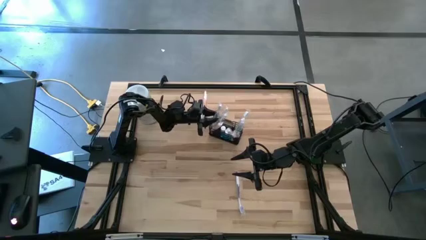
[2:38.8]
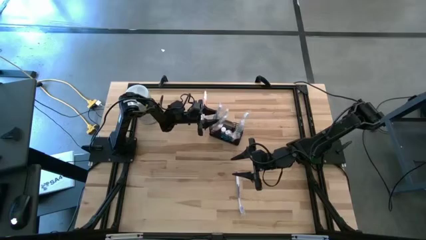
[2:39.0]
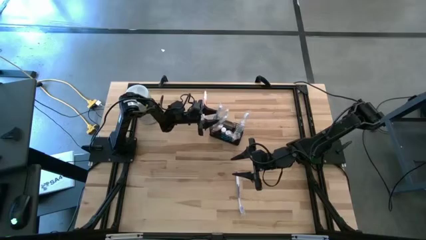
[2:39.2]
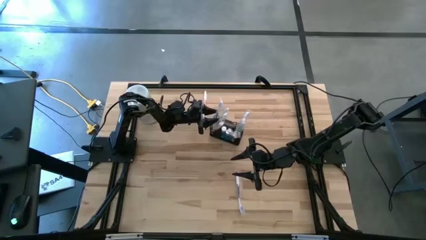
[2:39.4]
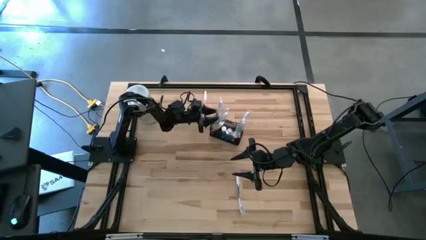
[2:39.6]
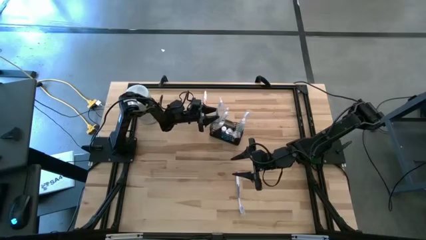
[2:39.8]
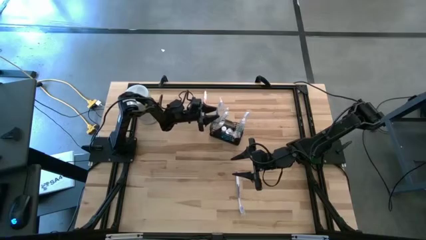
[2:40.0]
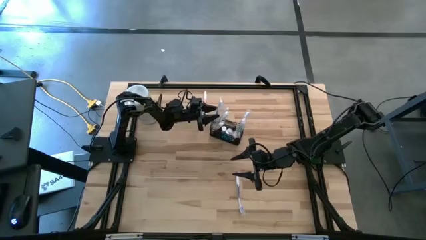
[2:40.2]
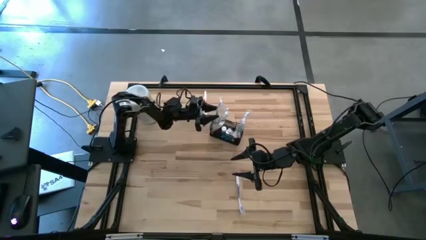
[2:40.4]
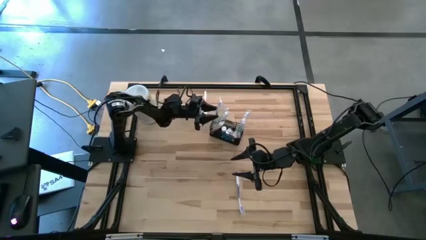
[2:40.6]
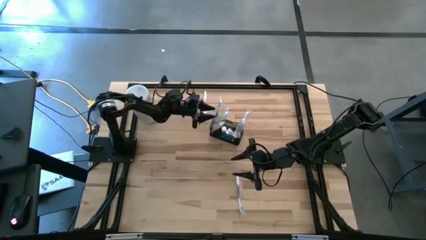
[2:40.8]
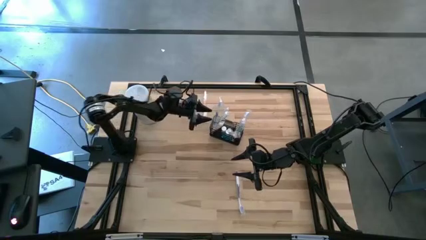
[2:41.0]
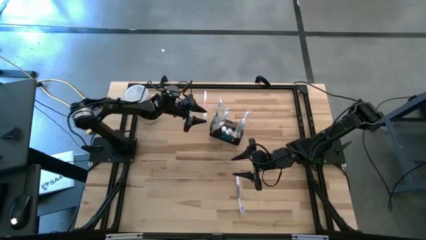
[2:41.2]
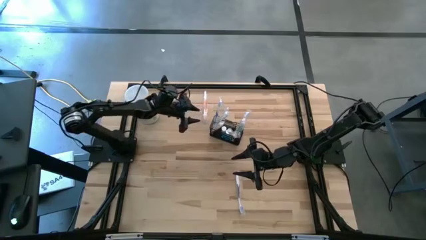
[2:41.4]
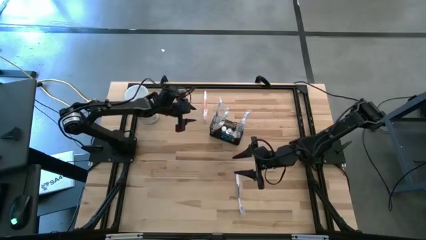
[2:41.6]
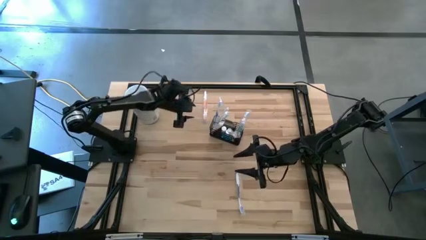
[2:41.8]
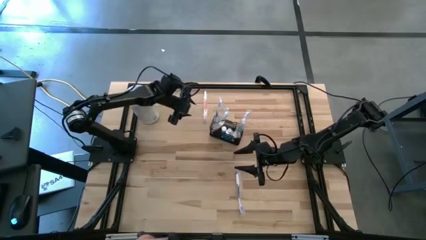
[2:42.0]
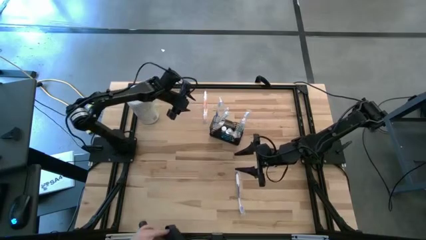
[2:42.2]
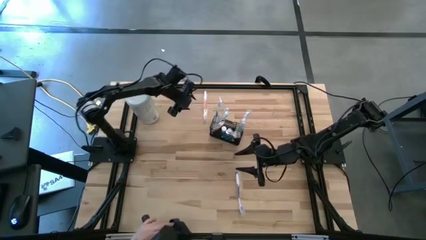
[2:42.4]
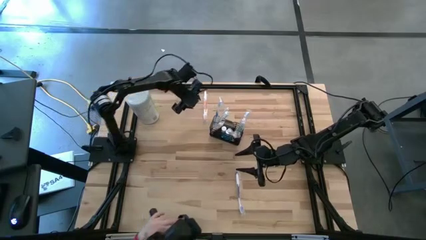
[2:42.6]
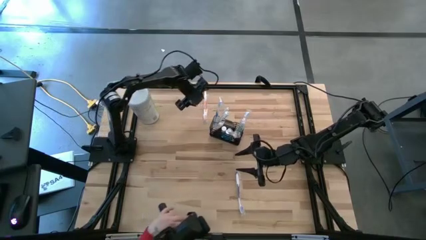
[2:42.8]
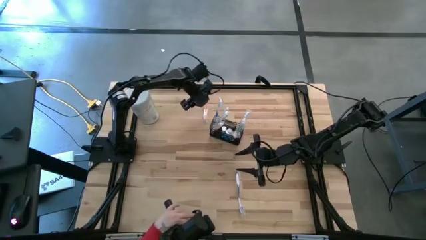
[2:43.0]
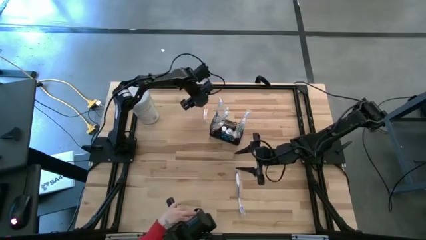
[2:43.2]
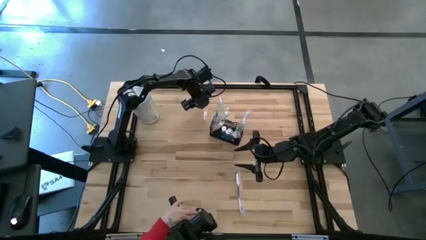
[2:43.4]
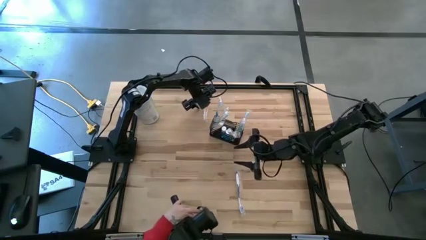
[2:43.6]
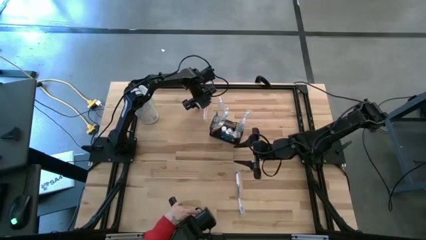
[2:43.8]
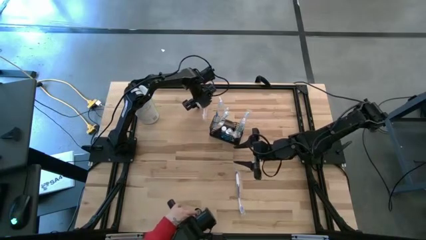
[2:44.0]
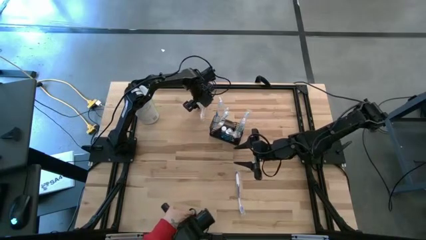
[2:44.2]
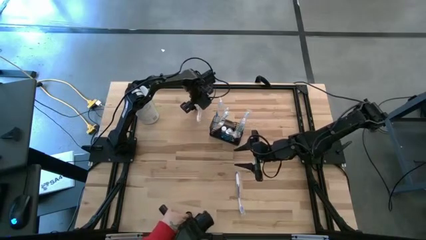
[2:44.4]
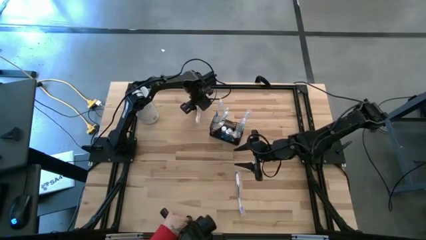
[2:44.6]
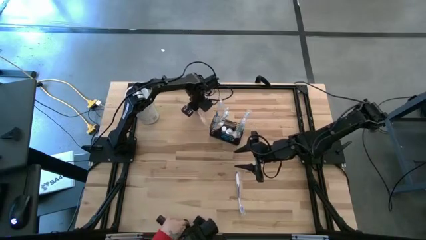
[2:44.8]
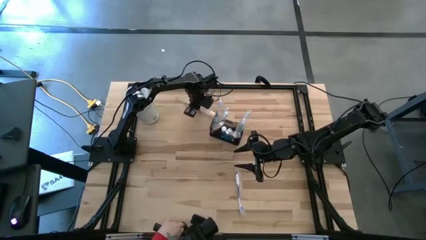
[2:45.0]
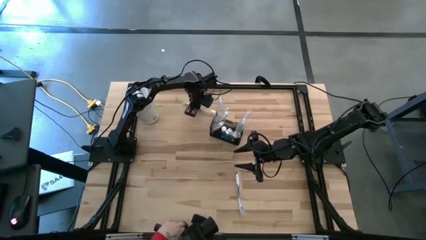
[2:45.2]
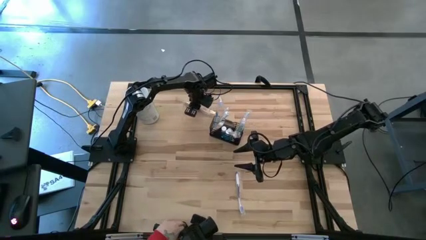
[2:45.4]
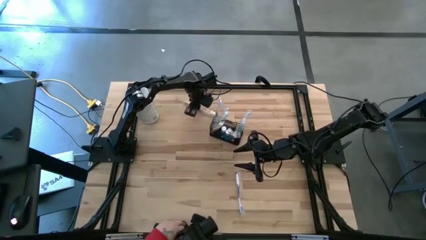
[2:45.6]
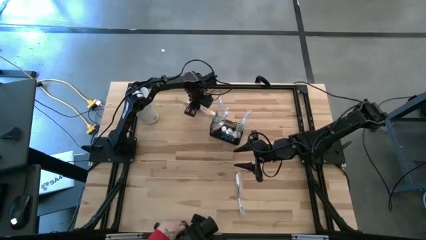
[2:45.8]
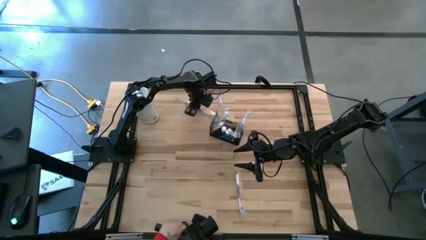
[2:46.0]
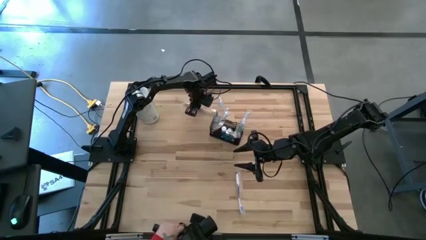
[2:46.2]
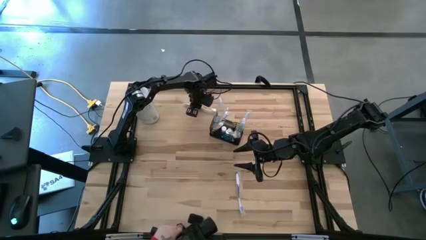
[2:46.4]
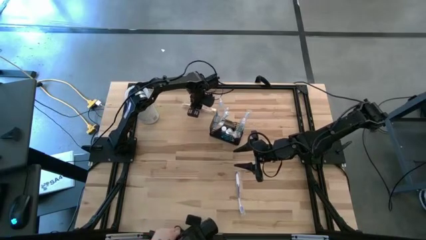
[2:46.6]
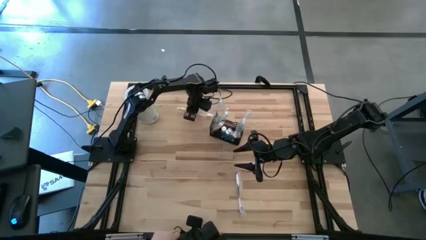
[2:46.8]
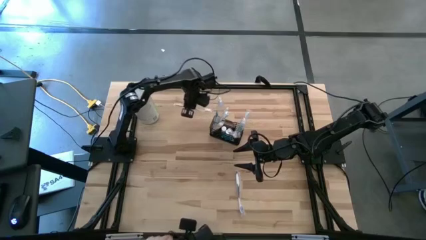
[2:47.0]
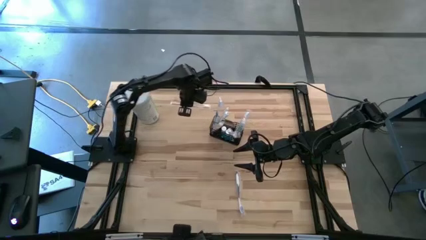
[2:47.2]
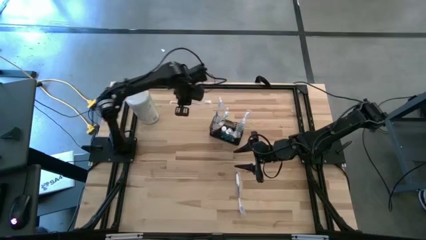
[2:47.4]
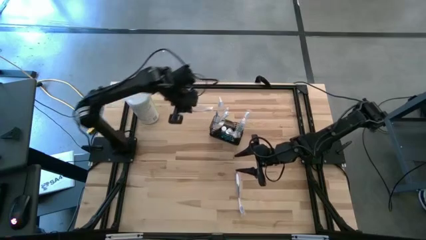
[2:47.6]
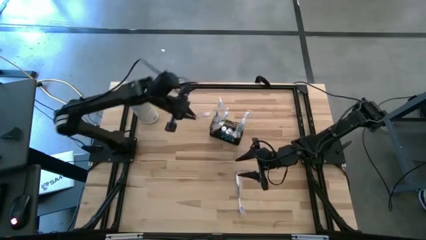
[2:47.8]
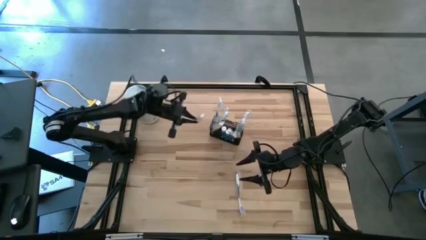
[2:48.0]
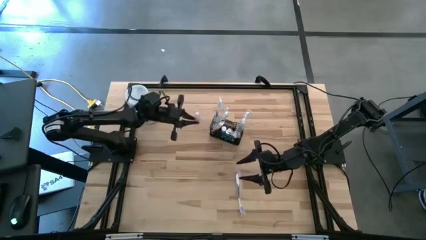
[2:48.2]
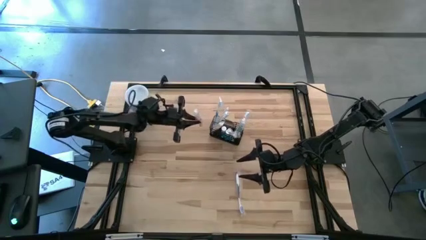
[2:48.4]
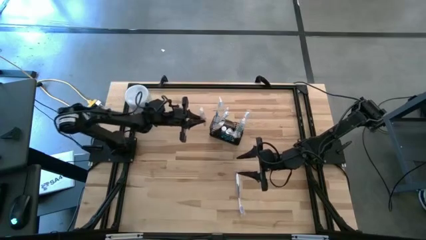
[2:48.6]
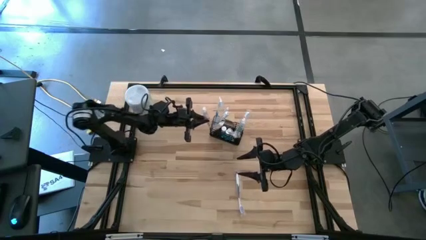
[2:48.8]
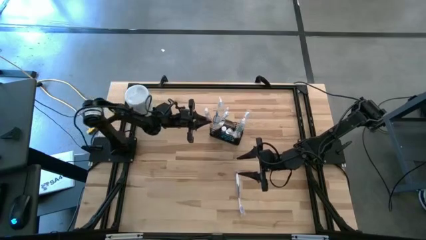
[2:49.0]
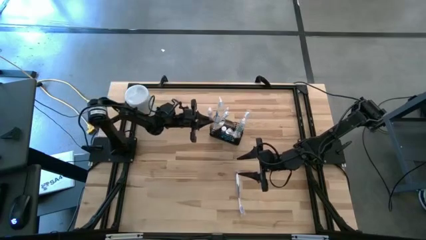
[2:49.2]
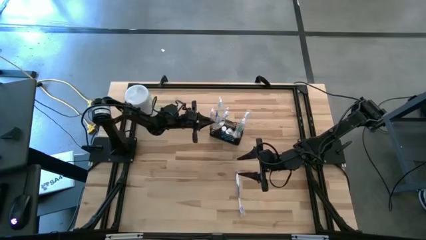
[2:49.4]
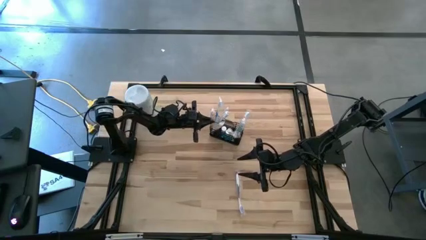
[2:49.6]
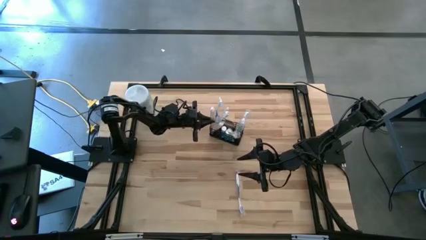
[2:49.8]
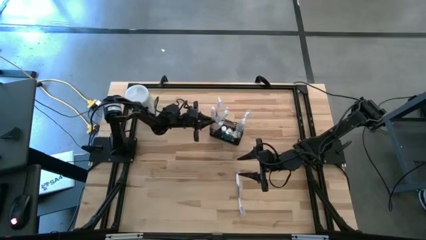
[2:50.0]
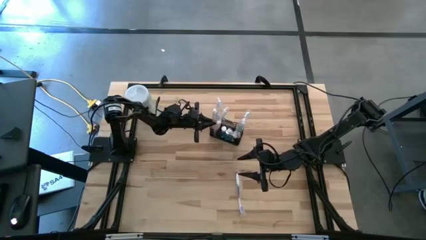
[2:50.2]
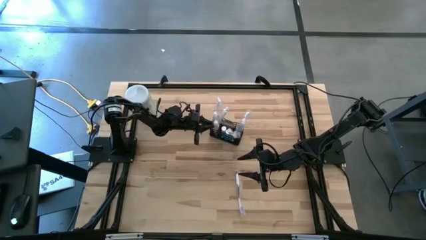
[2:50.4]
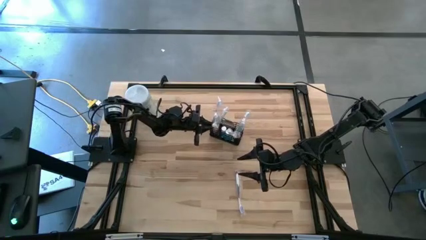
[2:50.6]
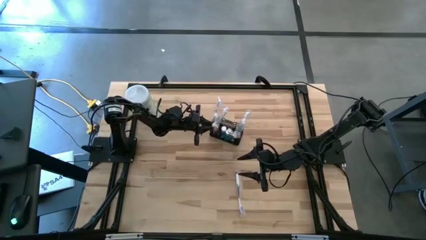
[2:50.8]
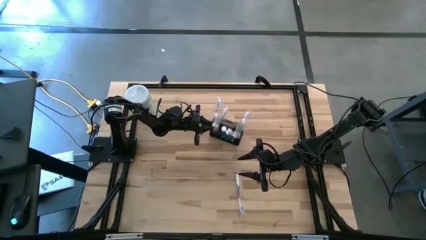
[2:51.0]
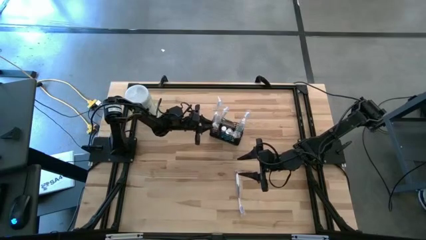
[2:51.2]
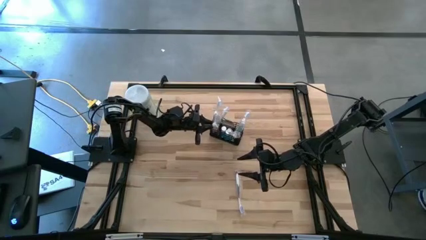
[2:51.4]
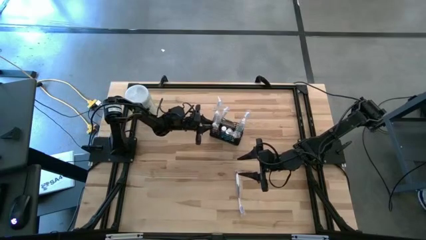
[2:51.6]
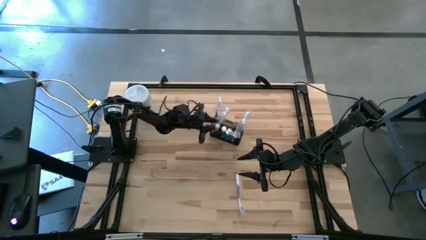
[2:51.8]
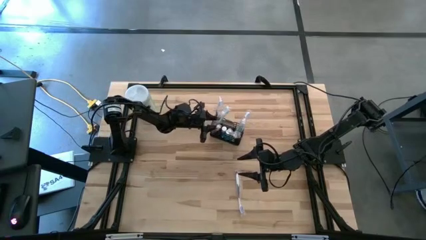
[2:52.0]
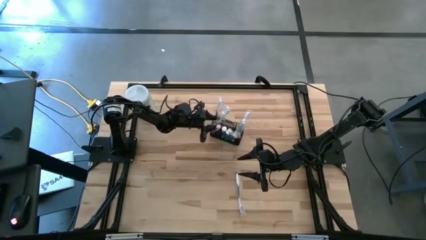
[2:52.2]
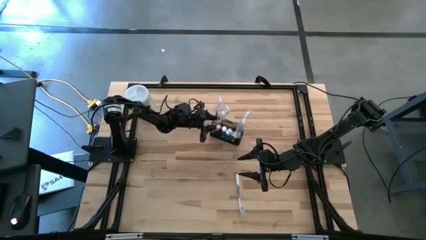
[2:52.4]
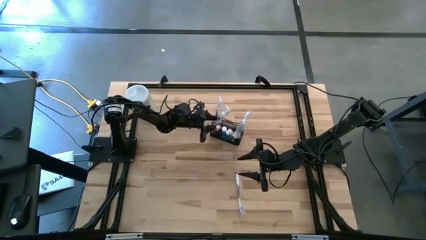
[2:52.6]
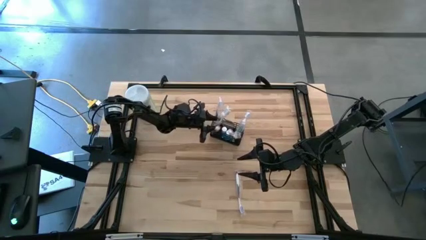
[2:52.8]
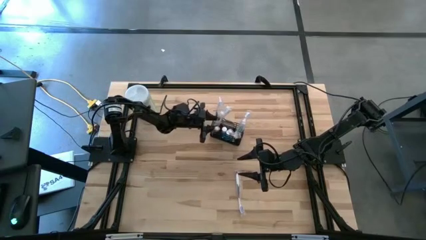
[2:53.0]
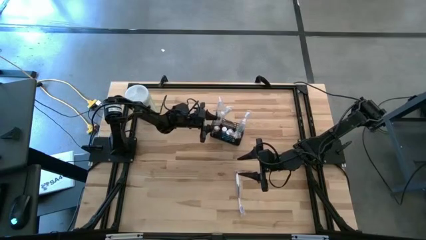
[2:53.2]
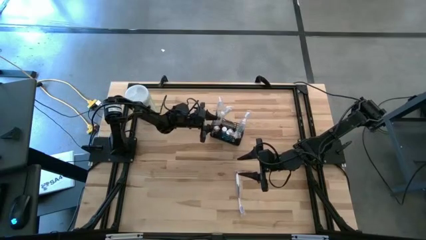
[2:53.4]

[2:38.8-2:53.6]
Task: Pick & Place toothbrushing station
Put the orange toothbrush into the mesh organizer

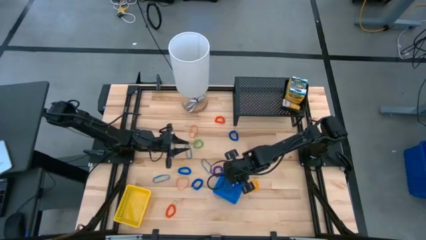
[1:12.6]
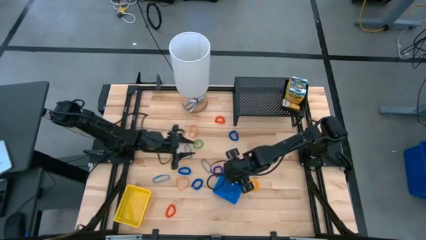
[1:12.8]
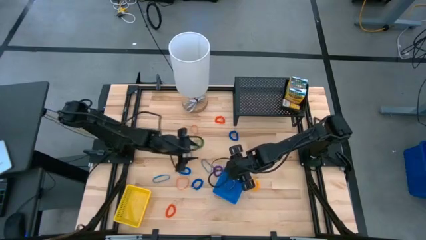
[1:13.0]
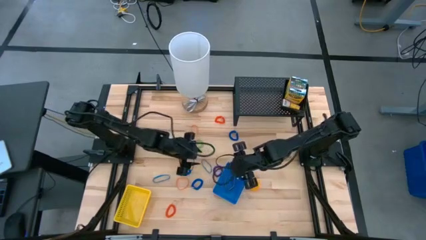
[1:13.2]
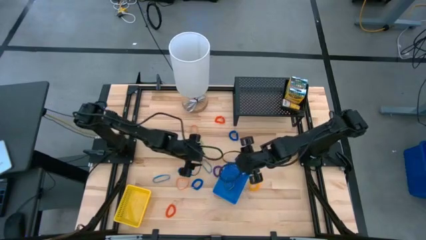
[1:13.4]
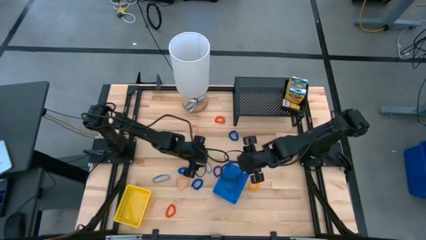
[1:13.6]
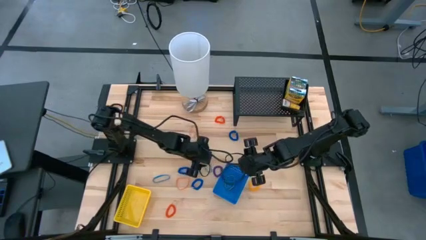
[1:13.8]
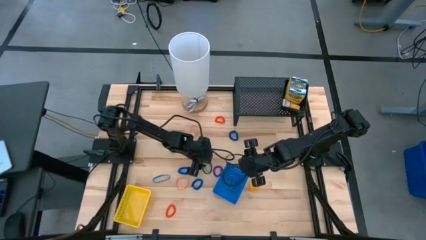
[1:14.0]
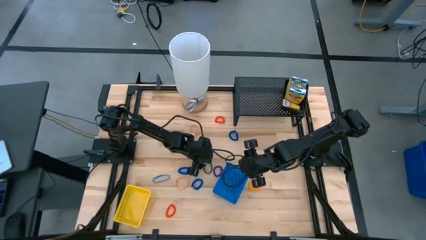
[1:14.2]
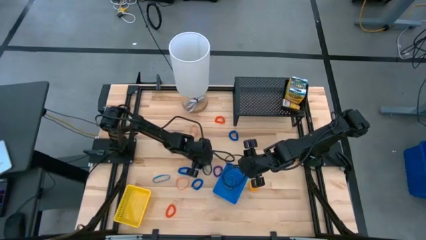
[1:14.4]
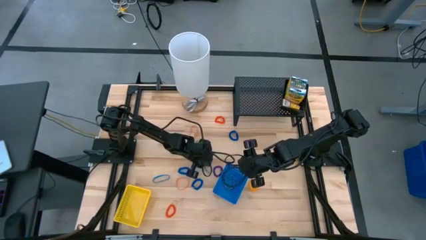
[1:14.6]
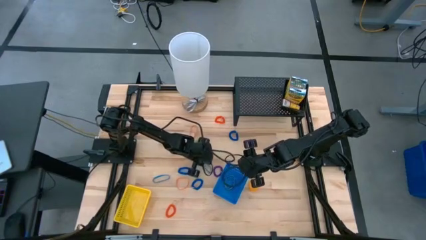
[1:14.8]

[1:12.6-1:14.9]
Task: Pick & Place Office Desk Supplies
Put the blue rubber band into the blue bin
